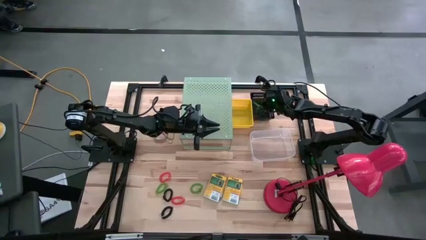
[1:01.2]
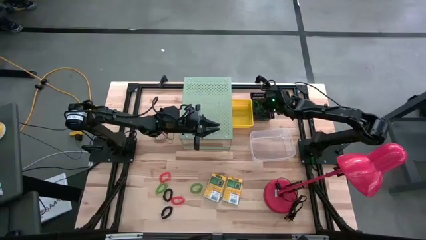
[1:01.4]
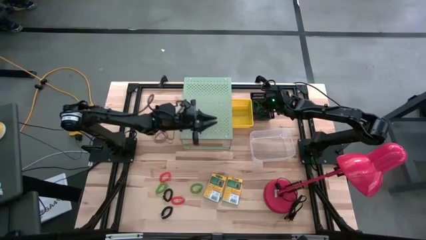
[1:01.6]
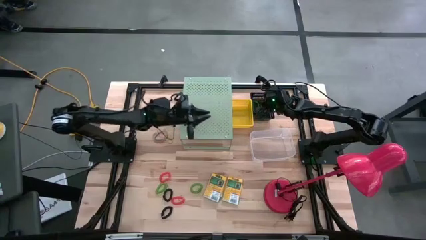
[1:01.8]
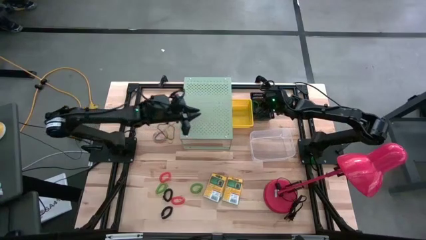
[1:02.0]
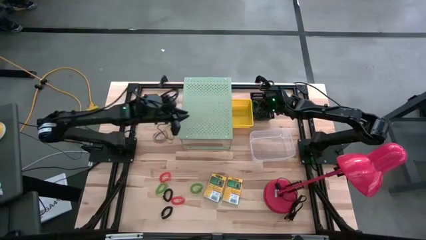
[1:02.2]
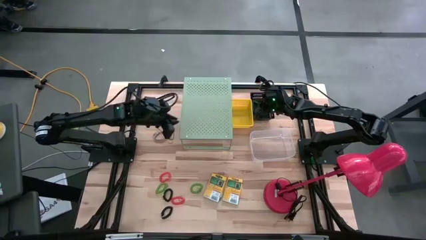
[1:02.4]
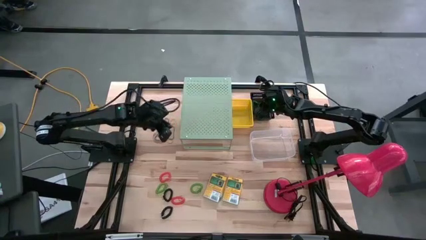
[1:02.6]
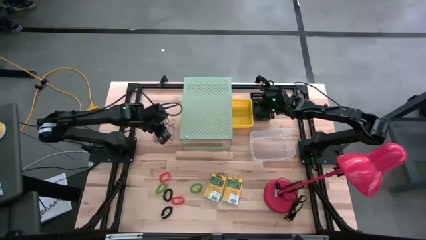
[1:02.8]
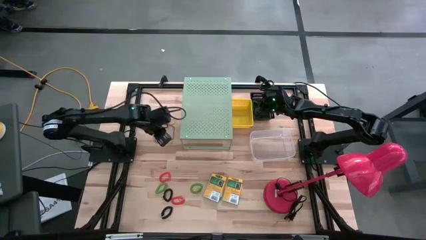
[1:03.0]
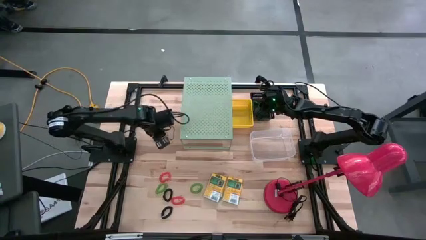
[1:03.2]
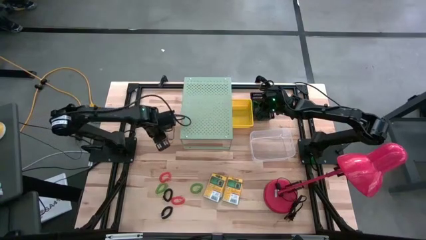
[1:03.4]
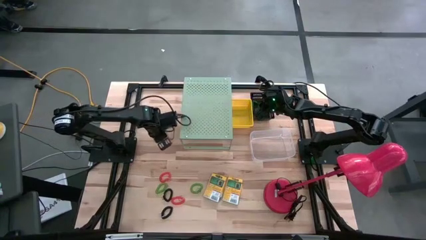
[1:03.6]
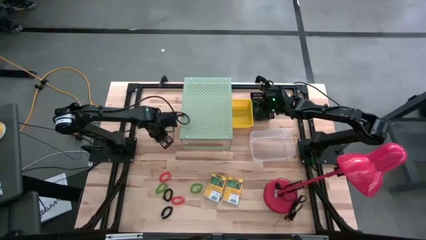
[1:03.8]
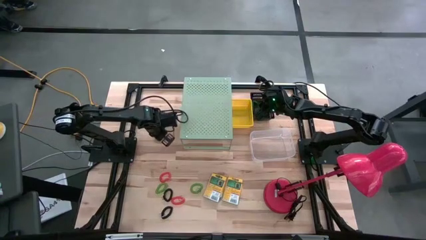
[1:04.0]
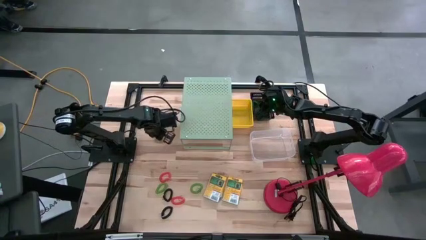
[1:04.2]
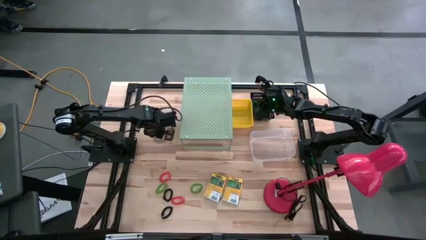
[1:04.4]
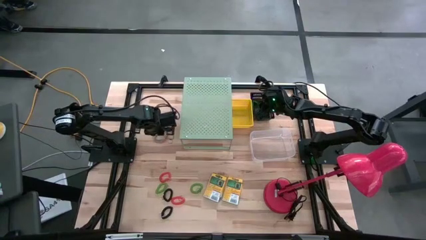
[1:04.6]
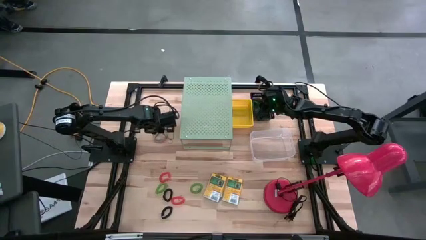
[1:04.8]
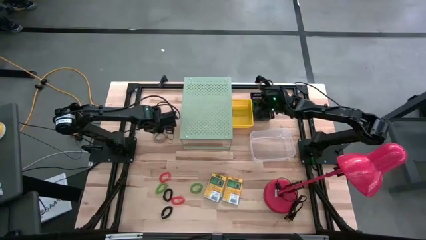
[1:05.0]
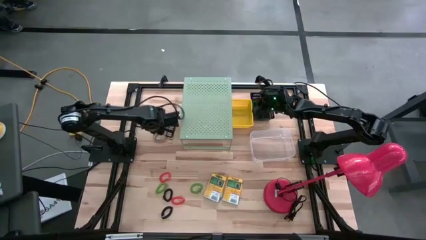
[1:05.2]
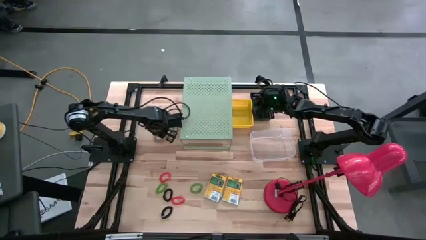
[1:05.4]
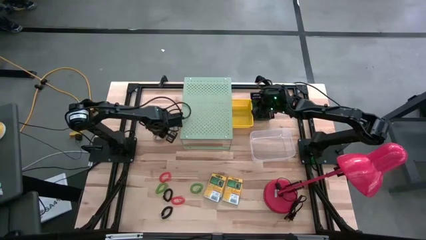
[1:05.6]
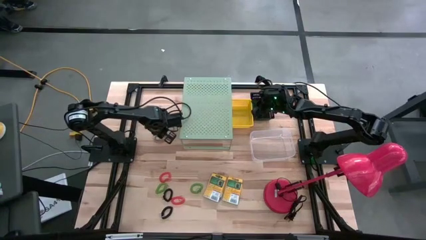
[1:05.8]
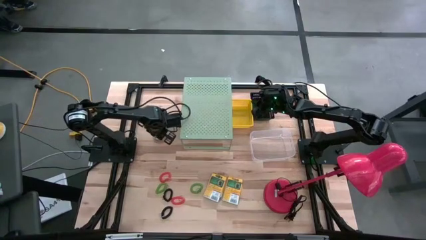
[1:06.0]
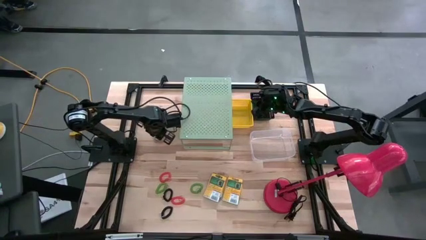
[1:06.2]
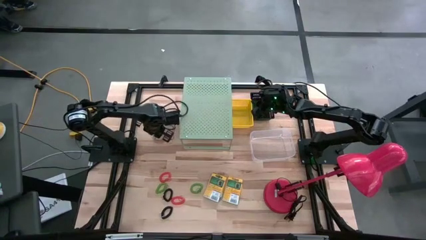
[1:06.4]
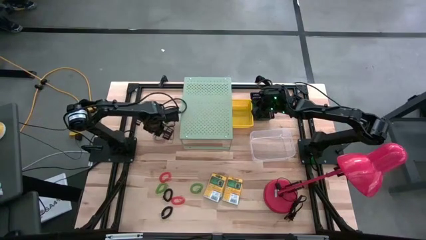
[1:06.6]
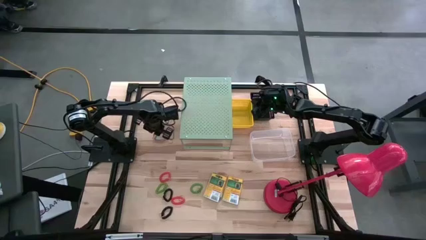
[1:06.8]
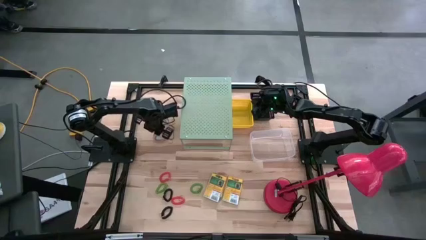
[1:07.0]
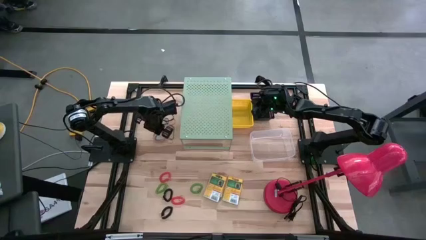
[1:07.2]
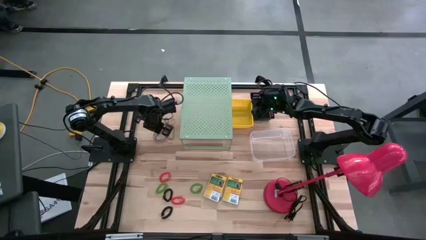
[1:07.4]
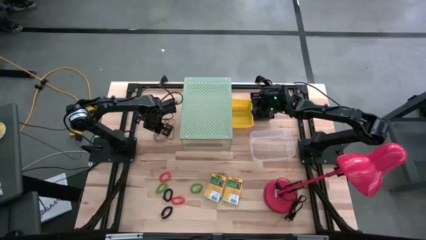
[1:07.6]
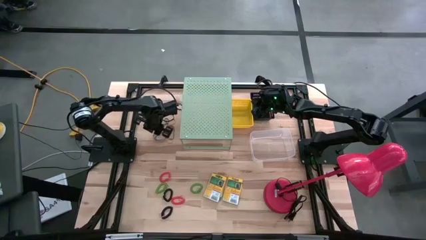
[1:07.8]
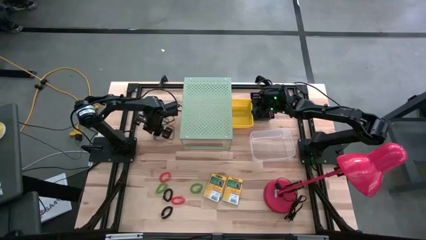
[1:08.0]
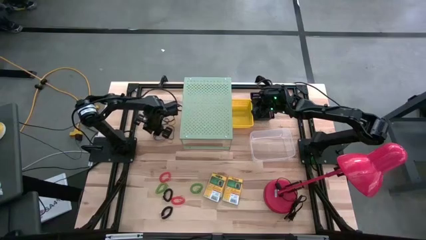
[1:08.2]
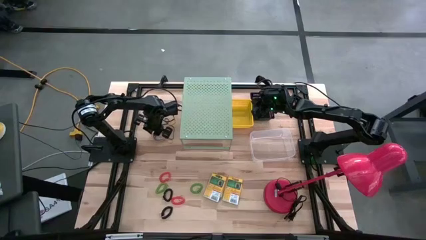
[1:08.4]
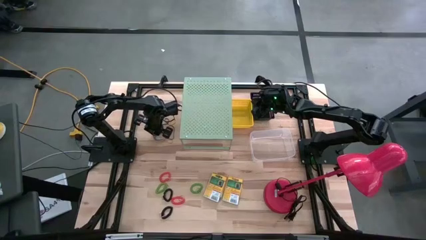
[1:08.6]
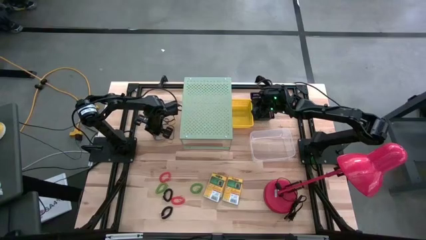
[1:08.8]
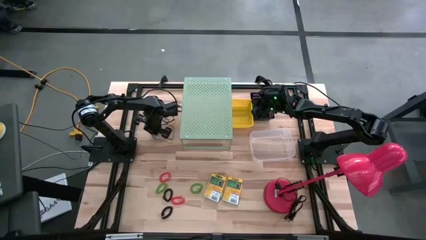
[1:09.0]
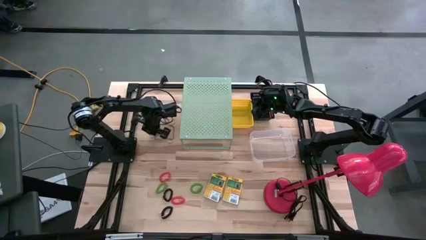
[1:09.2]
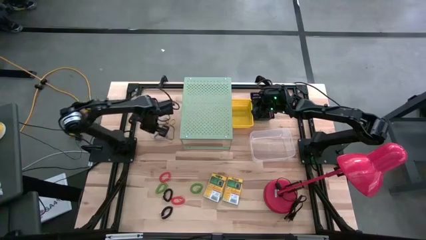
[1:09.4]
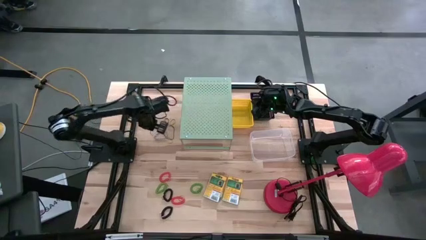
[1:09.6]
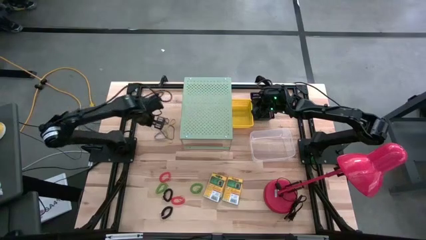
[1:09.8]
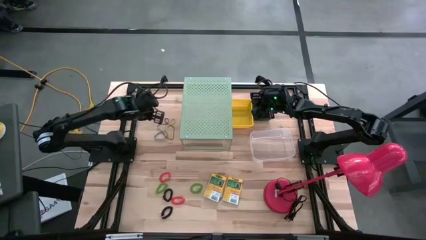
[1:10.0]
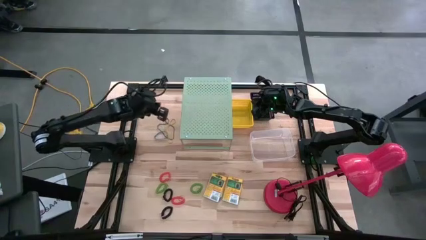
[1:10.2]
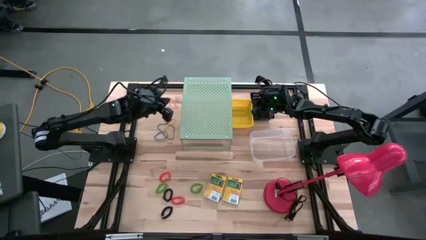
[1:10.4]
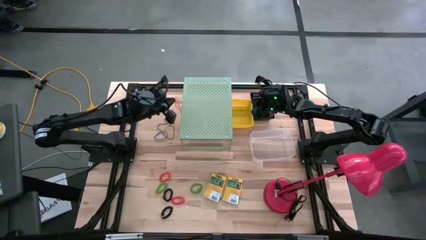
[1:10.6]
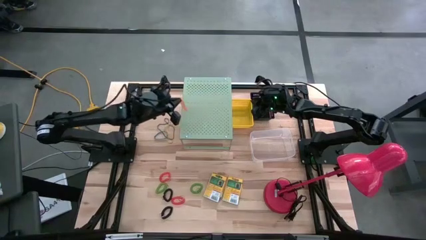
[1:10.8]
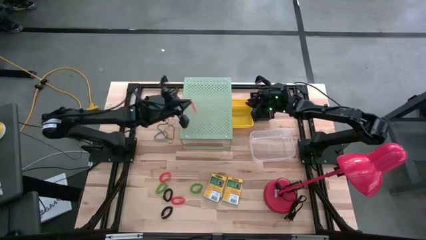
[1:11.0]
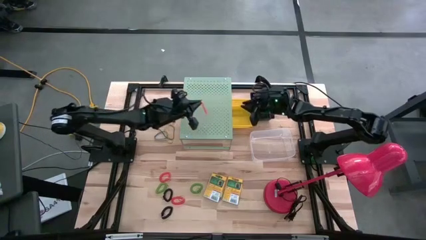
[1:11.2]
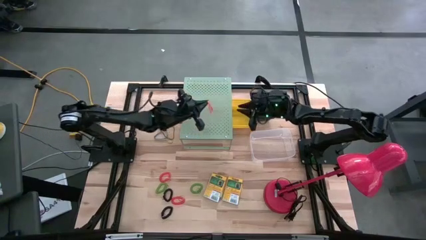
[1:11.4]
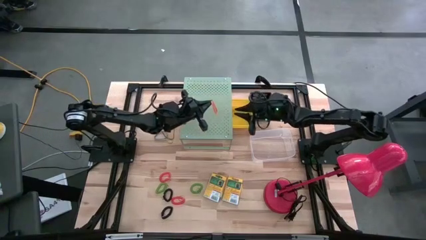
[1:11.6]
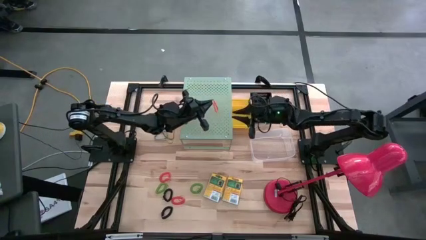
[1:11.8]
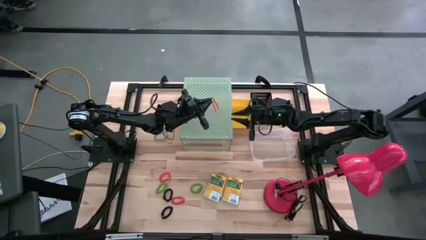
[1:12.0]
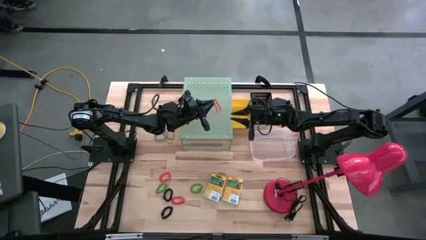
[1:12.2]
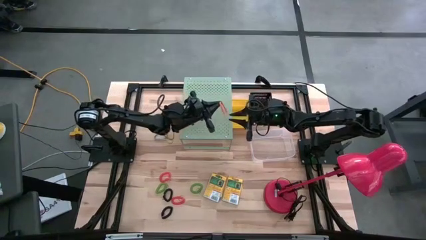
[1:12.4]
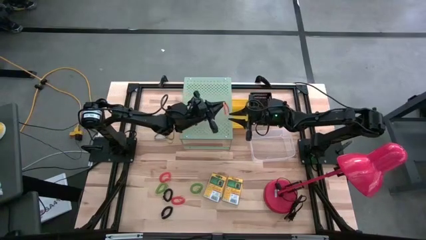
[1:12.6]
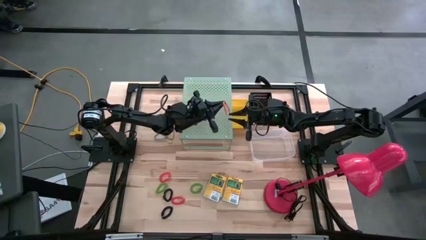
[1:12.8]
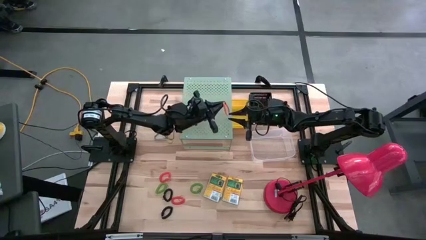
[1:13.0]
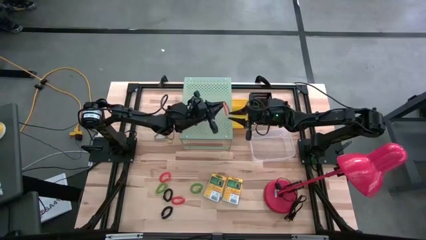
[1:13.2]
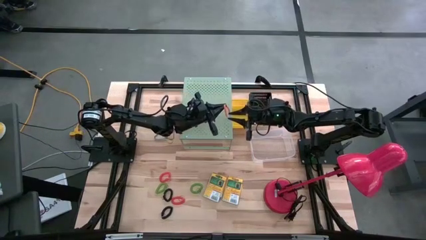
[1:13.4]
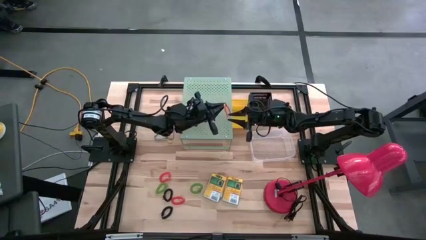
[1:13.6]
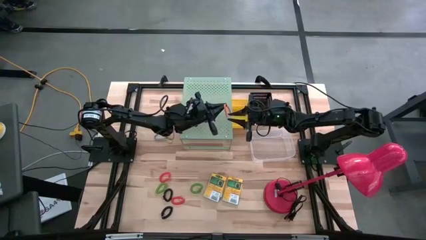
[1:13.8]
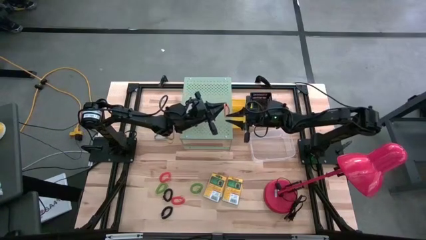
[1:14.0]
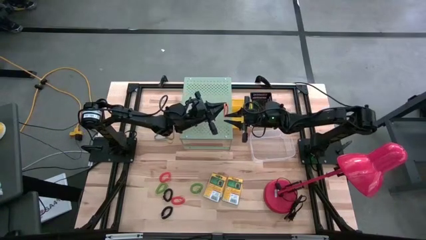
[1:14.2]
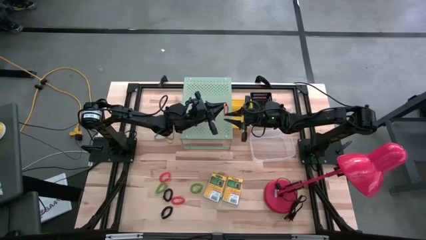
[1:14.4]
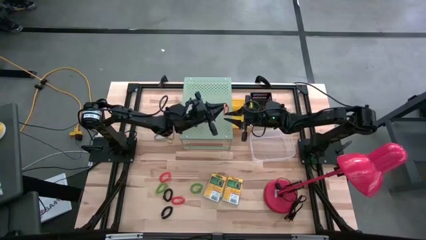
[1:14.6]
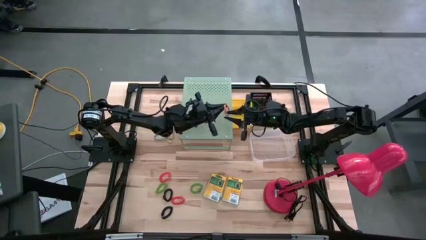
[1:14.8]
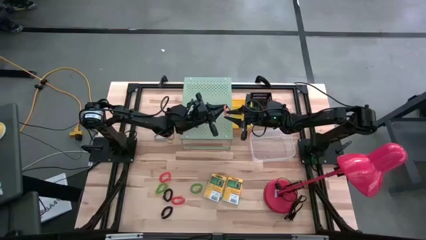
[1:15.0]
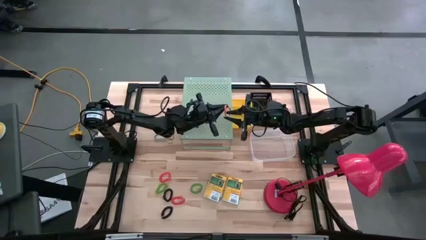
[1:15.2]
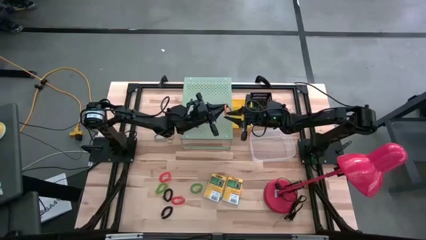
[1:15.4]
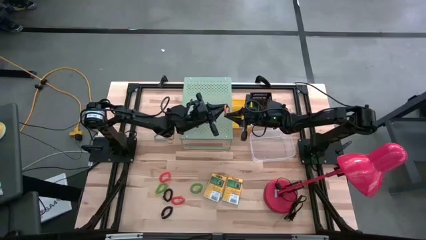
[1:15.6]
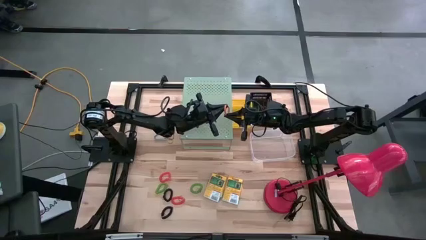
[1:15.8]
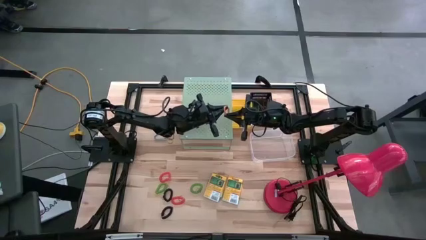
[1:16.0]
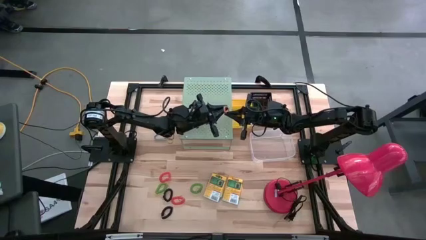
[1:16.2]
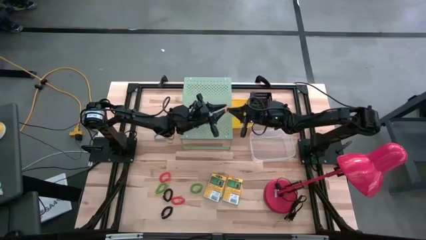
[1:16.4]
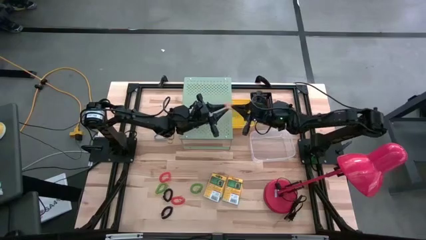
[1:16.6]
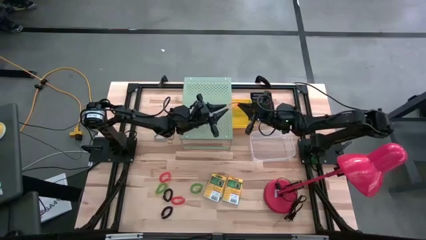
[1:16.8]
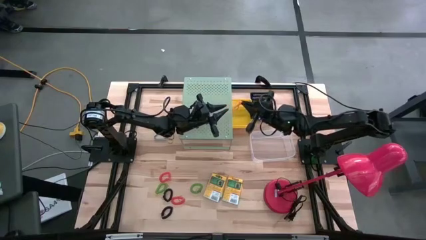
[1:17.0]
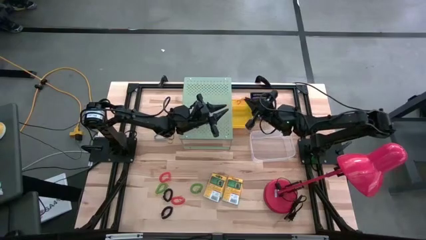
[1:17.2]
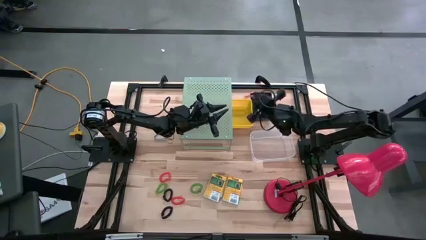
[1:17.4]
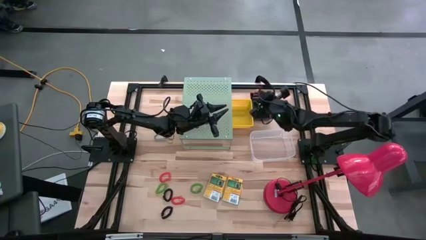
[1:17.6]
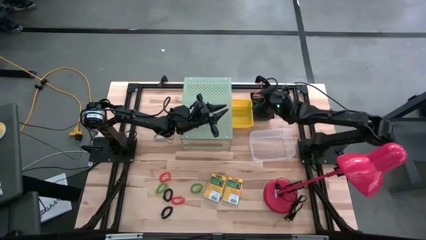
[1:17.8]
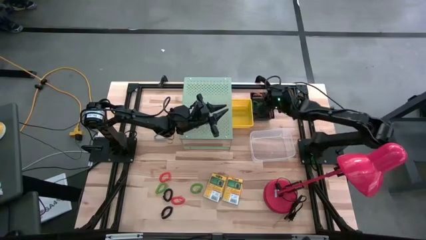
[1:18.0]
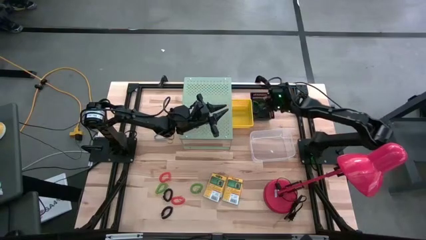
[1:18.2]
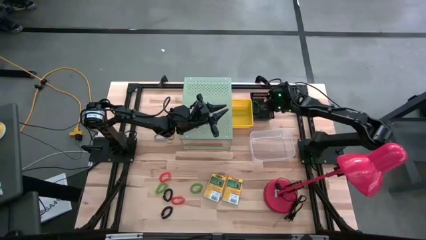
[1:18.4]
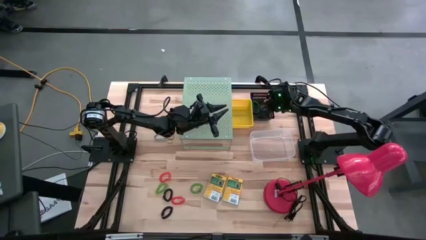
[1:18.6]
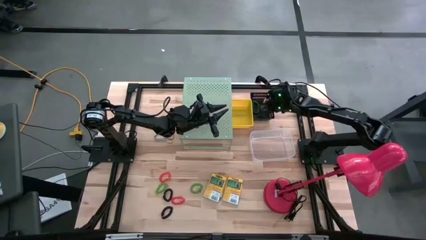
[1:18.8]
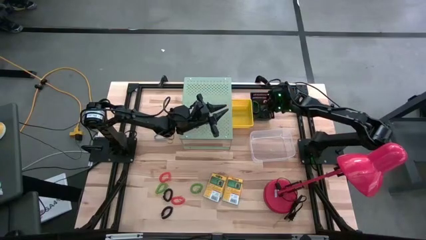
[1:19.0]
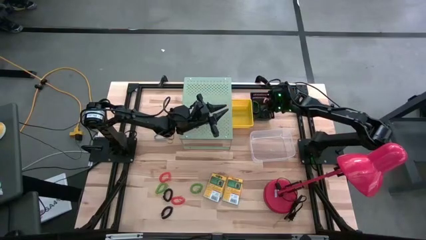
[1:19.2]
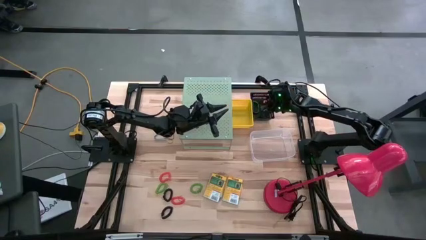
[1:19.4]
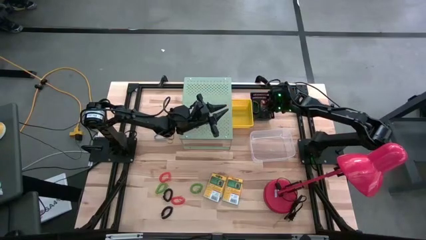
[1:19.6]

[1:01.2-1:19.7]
Task: Pick & Place Office Desk Supplies
Put the orange rubber band into the black bin
